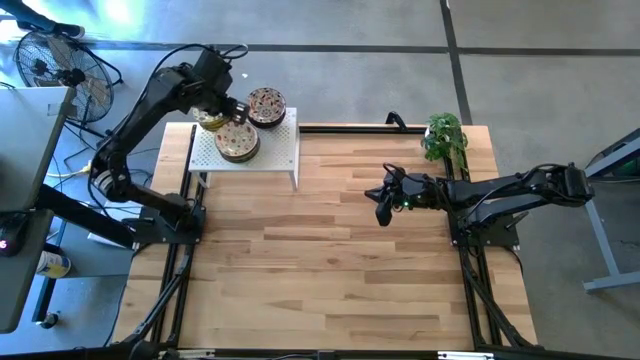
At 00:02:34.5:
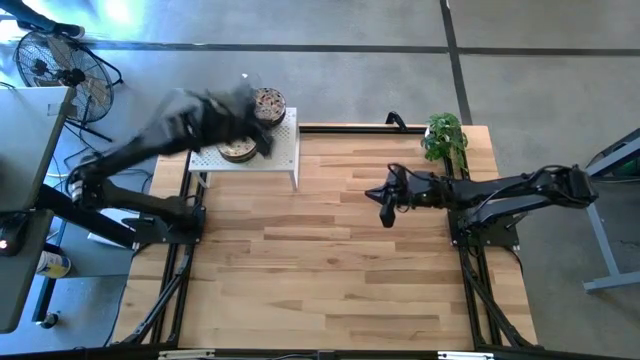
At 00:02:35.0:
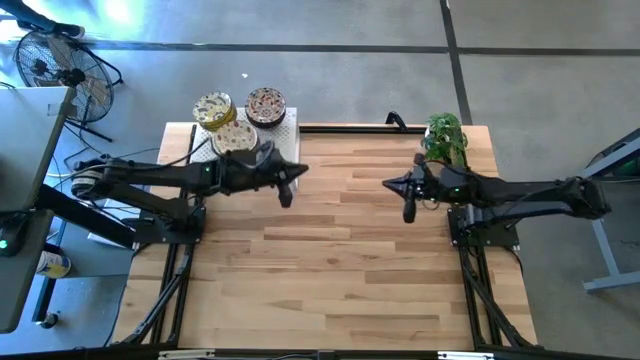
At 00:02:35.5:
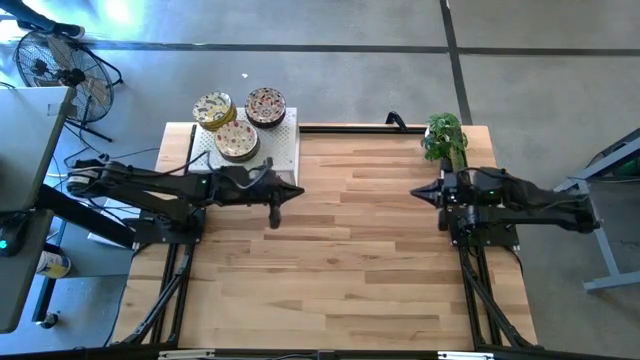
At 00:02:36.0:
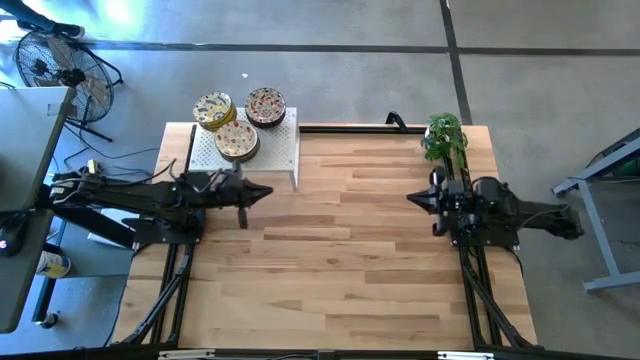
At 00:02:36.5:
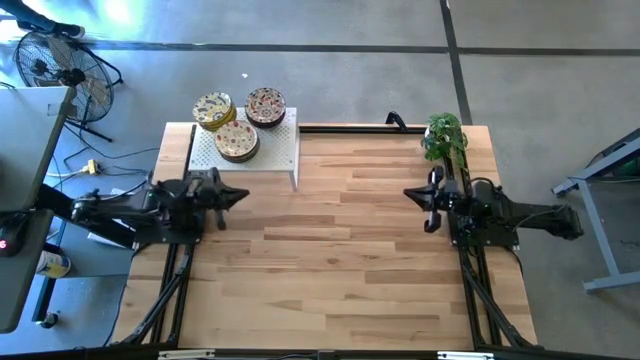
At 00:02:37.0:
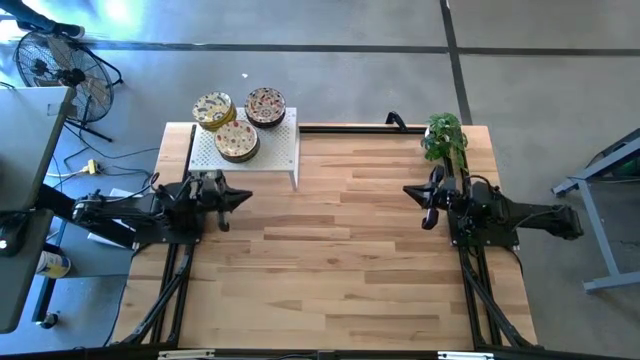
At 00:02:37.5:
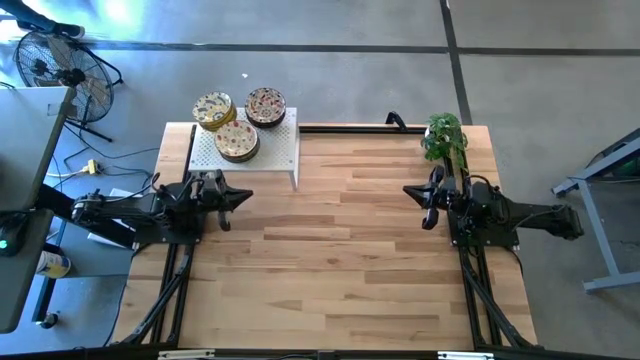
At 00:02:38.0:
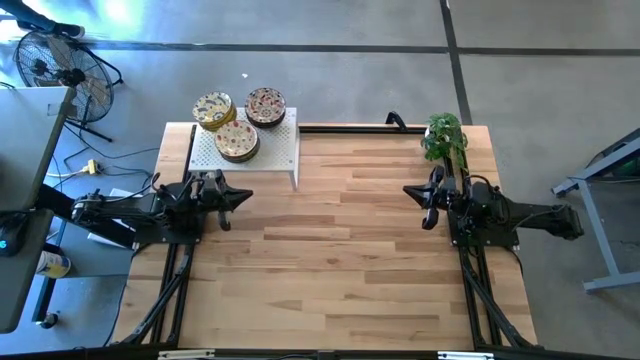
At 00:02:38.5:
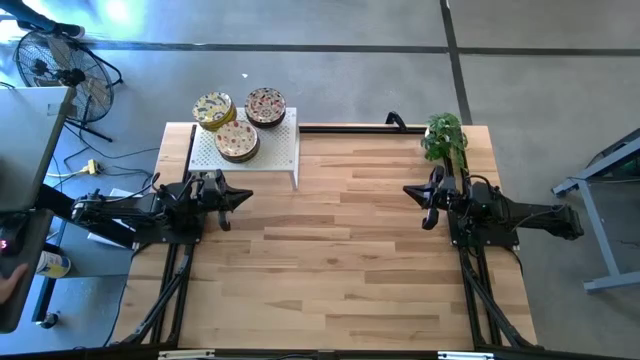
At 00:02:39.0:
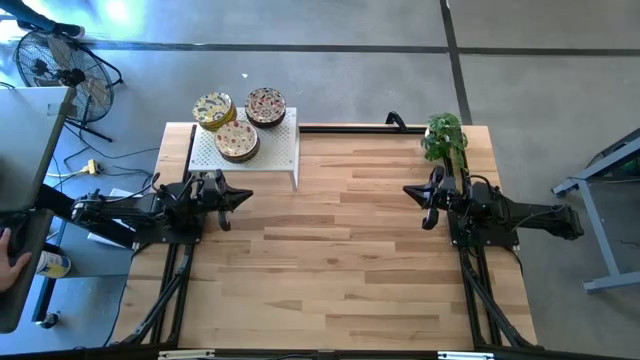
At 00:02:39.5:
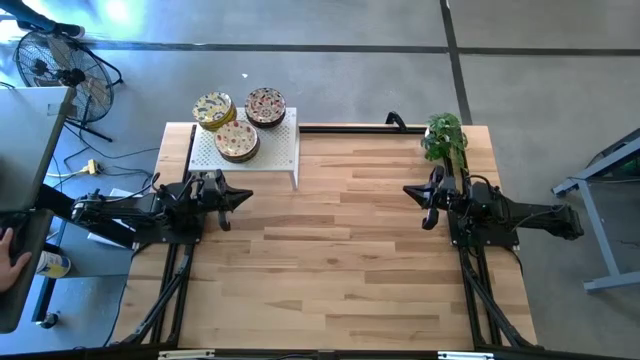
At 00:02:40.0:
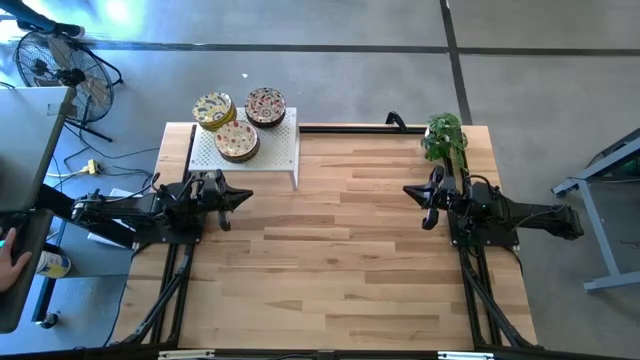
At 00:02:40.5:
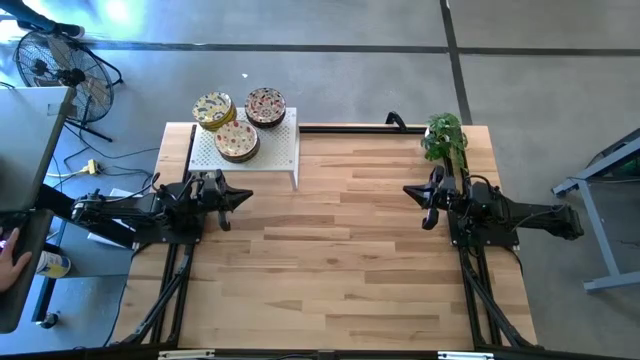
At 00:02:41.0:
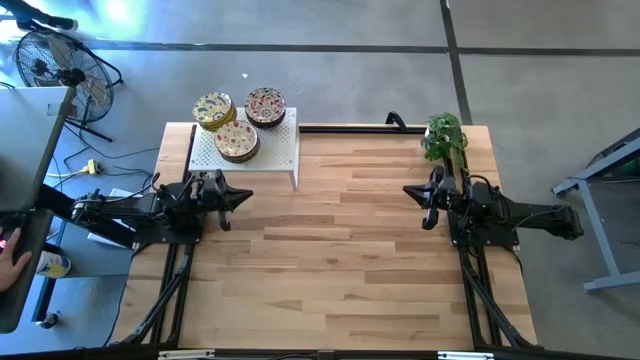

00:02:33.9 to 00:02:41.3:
Task: Pick & Place Mini bowls
Return to Home Position

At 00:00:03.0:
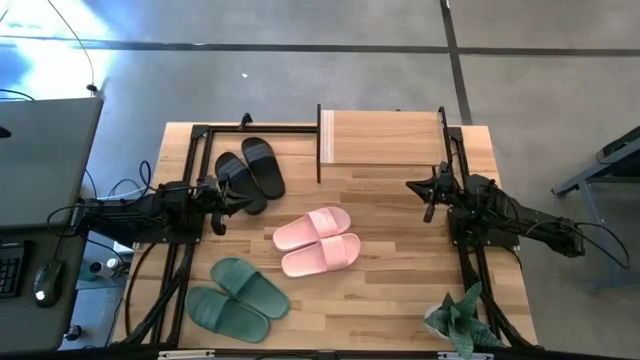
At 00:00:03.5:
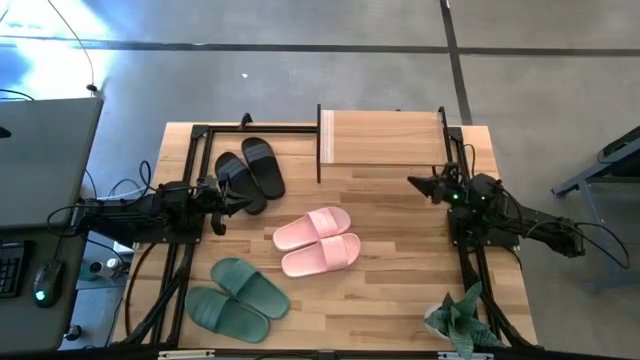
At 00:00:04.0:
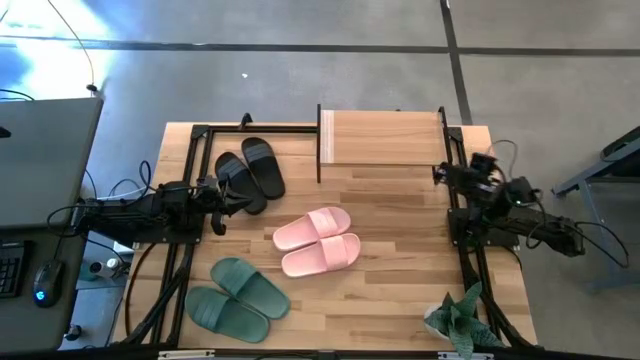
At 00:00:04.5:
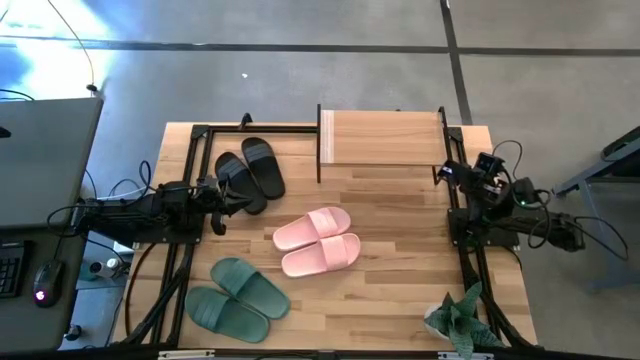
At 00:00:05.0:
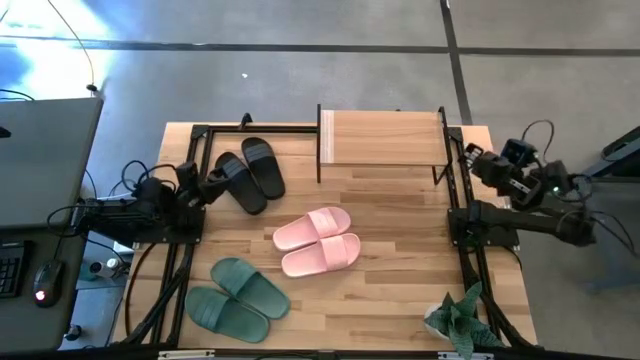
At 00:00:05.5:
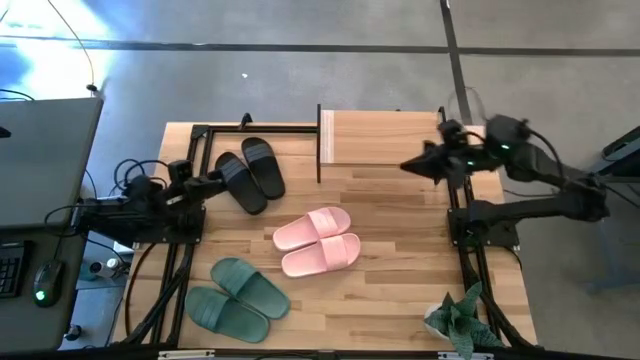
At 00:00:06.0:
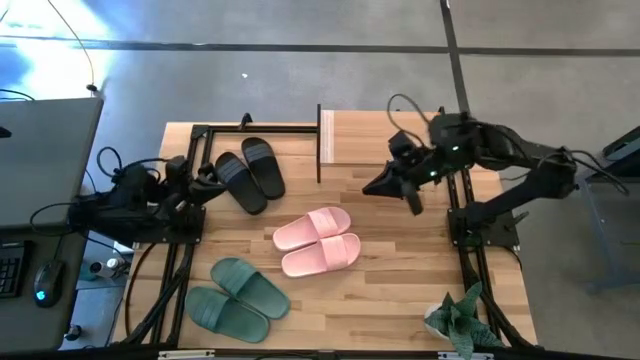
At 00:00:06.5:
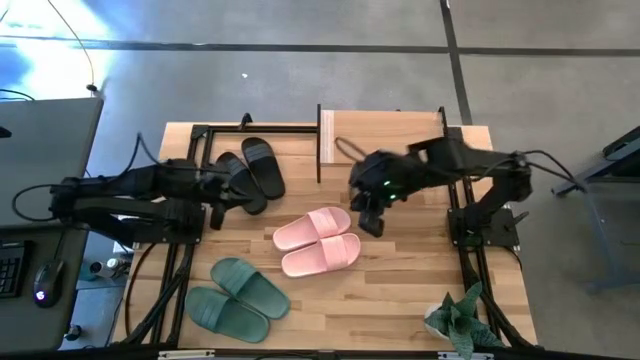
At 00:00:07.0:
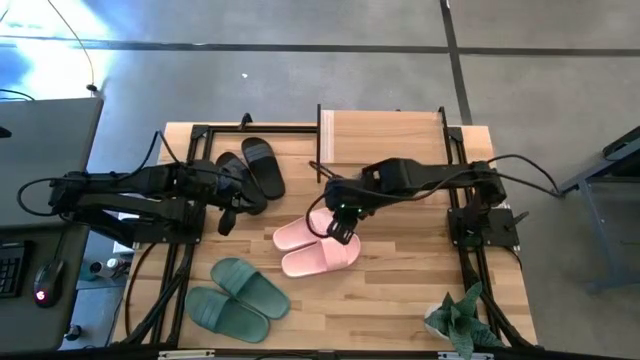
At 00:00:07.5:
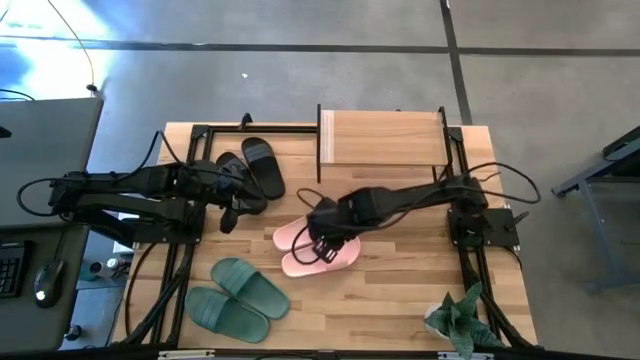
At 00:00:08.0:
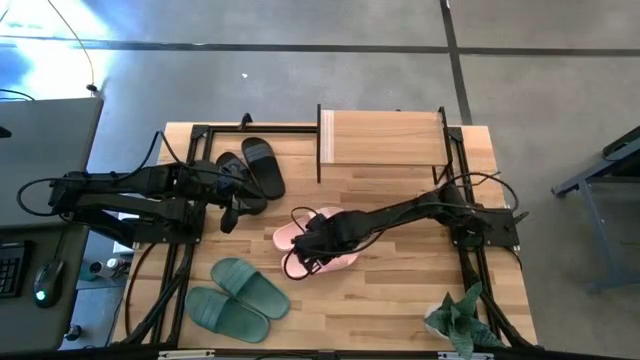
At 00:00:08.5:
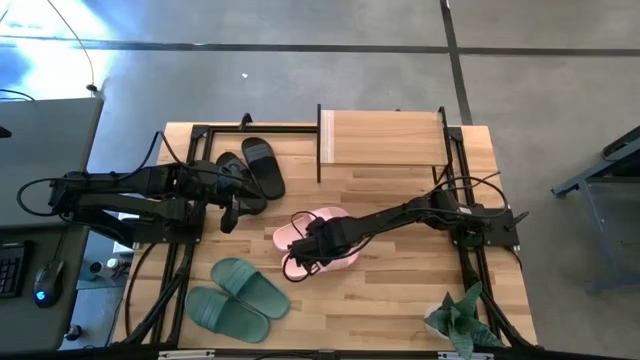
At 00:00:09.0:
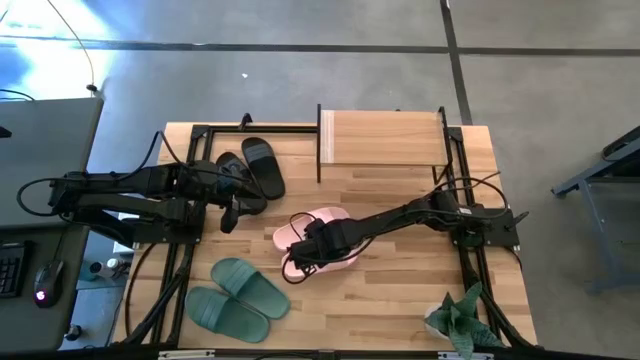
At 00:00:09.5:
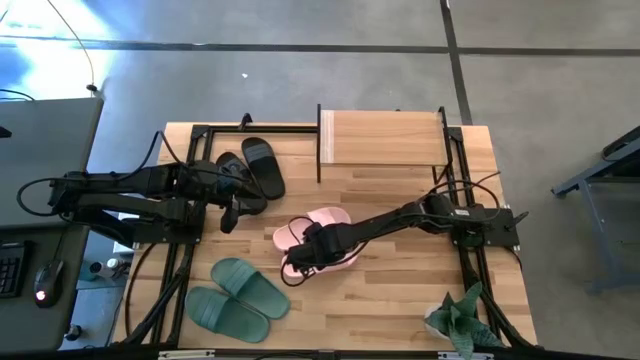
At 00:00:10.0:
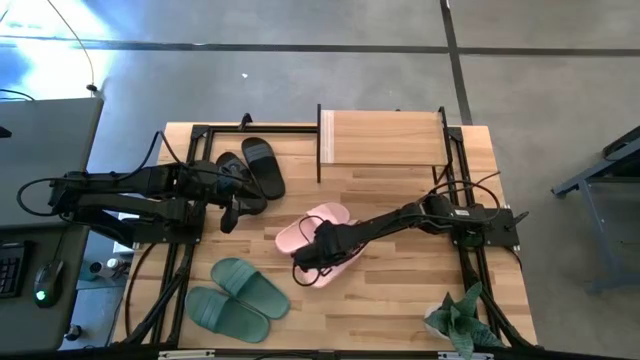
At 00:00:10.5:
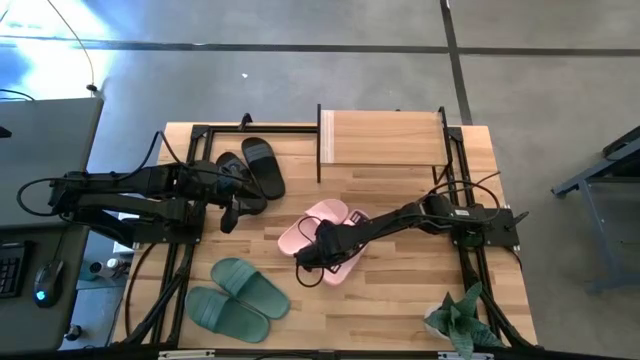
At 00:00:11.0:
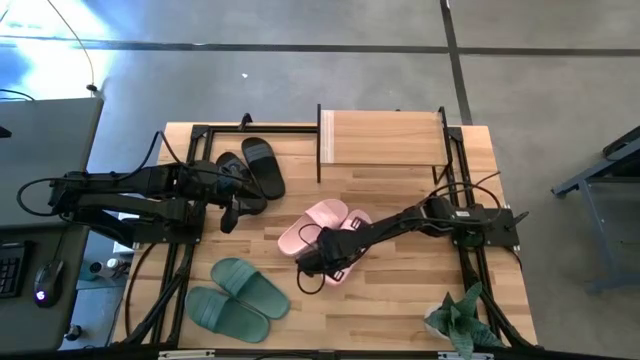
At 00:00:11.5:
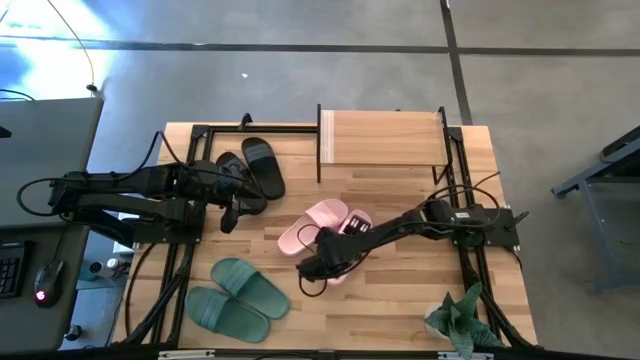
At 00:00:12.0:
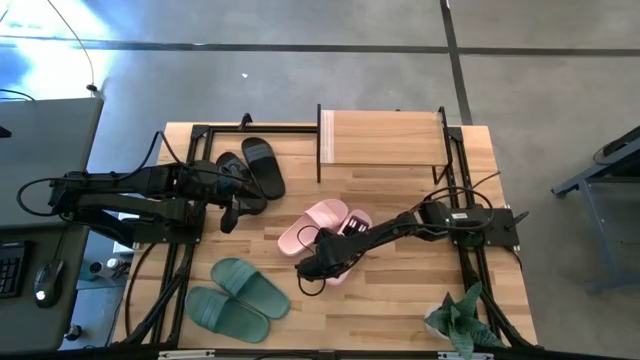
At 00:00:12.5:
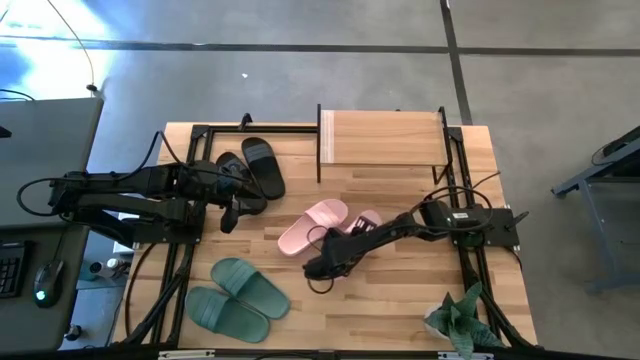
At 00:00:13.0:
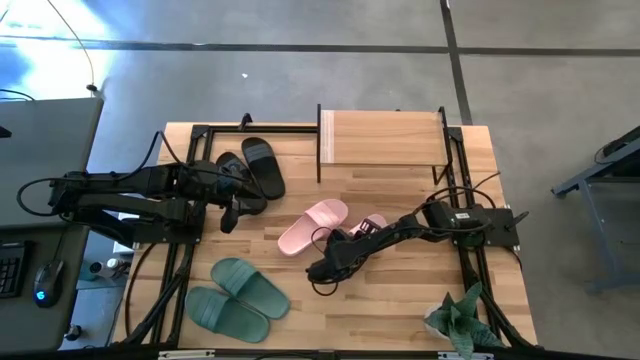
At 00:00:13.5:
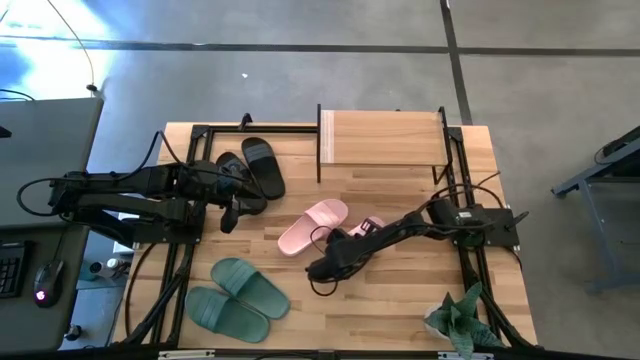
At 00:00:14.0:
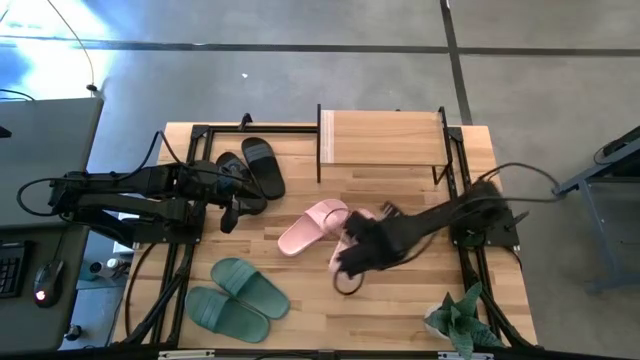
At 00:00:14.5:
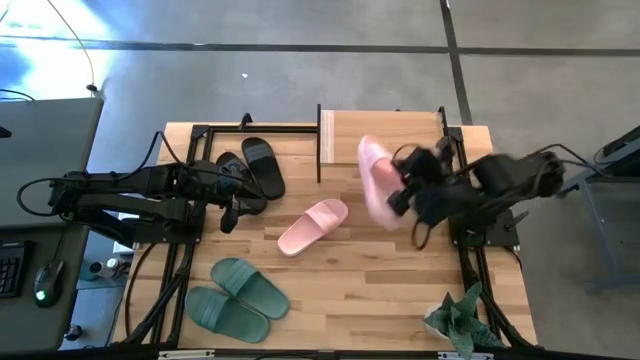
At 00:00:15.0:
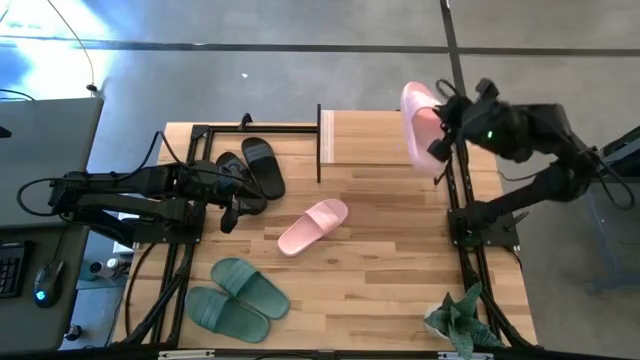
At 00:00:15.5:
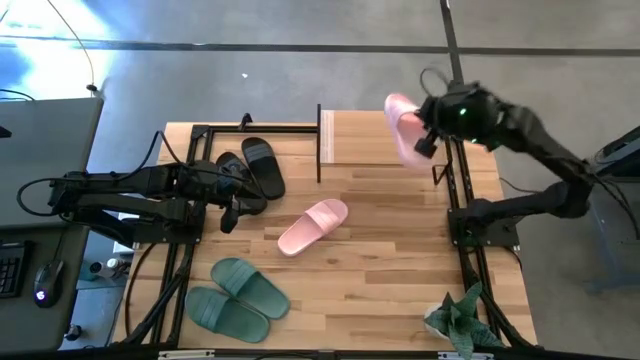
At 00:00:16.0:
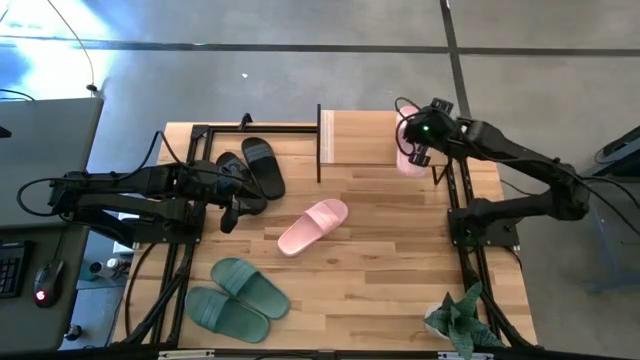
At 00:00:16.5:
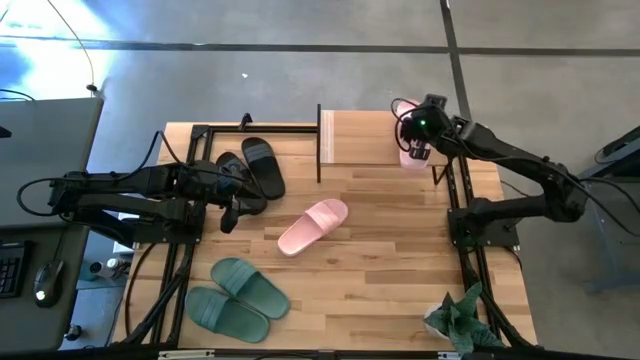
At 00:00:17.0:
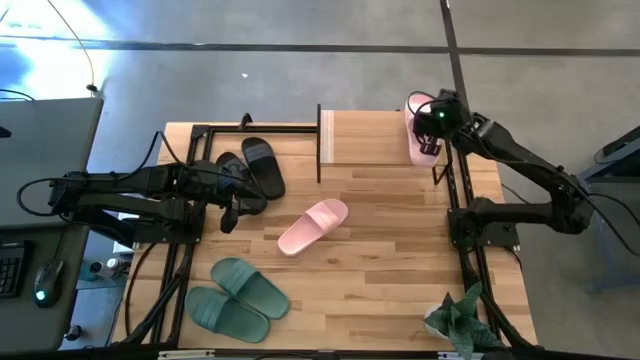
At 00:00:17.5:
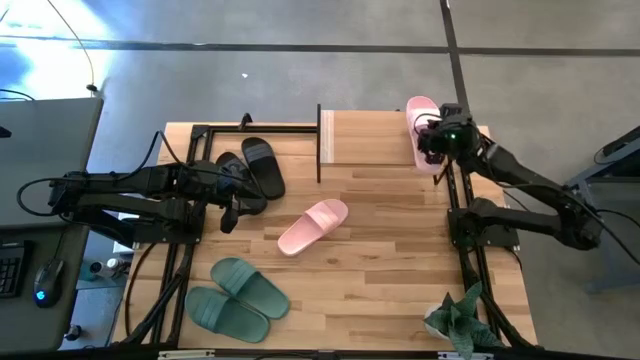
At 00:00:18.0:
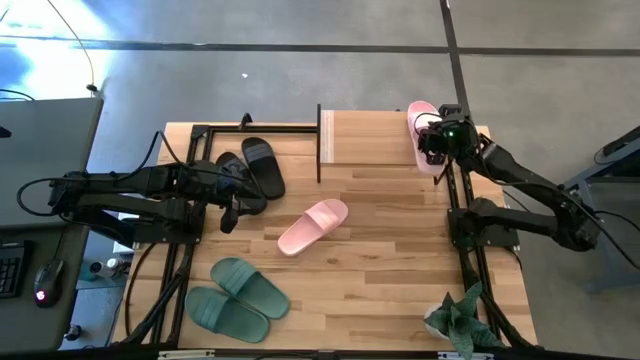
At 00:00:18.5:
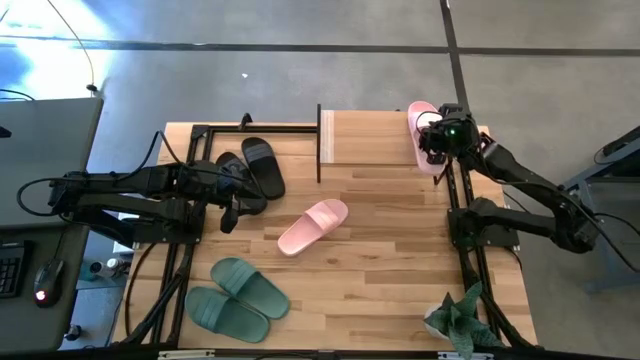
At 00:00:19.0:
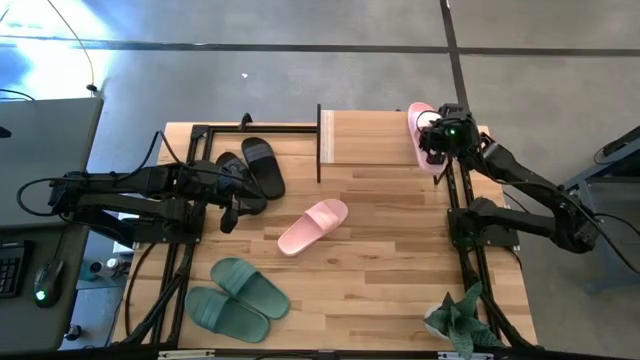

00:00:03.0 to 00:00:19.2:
Task: Pick and place slides into the shelf
Put the pink bottom slide on the shelf
